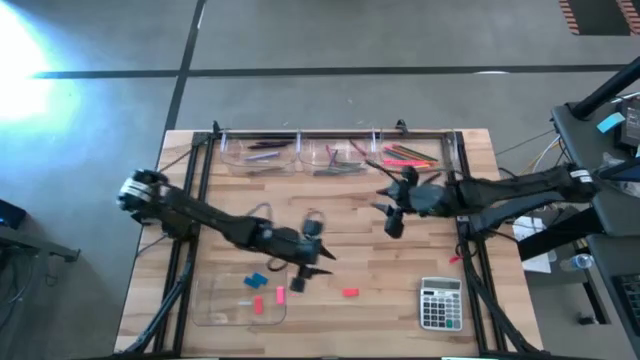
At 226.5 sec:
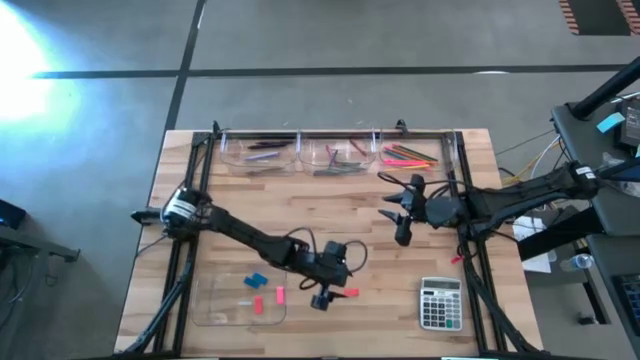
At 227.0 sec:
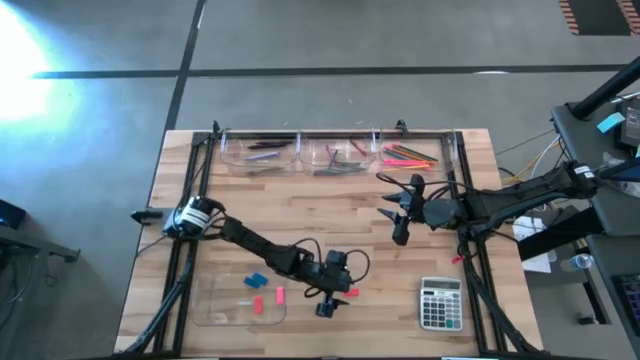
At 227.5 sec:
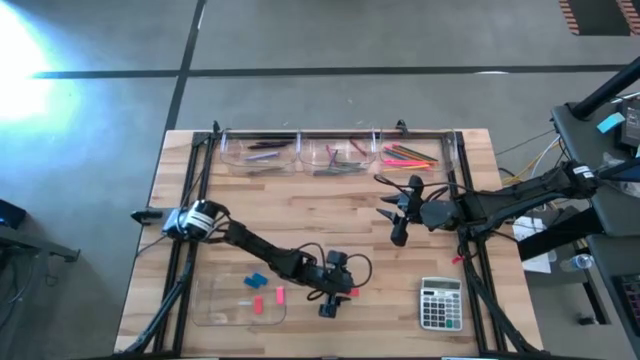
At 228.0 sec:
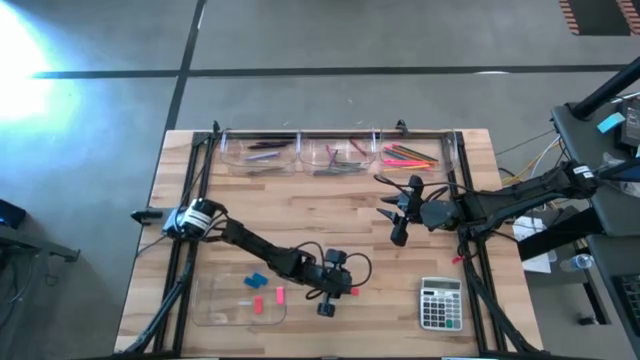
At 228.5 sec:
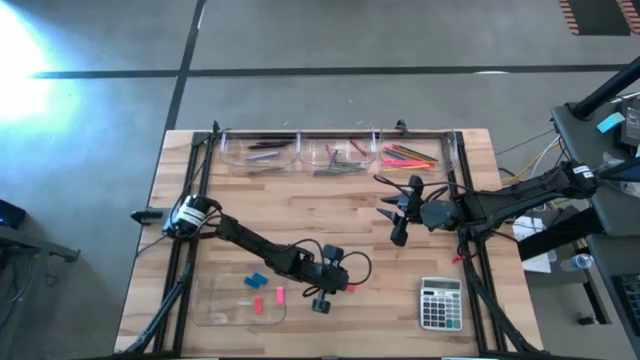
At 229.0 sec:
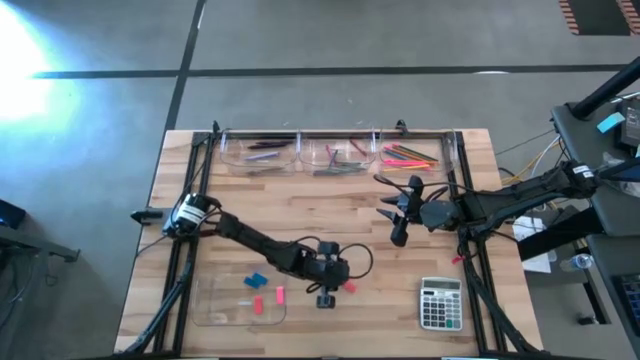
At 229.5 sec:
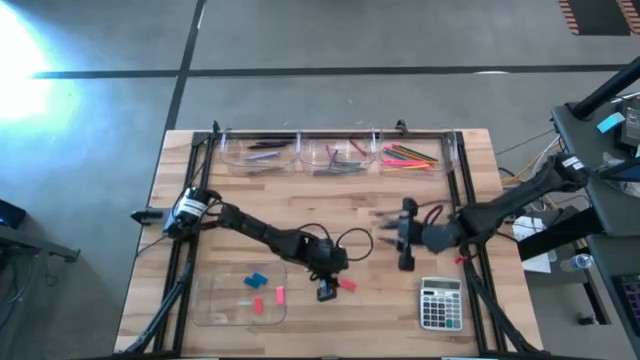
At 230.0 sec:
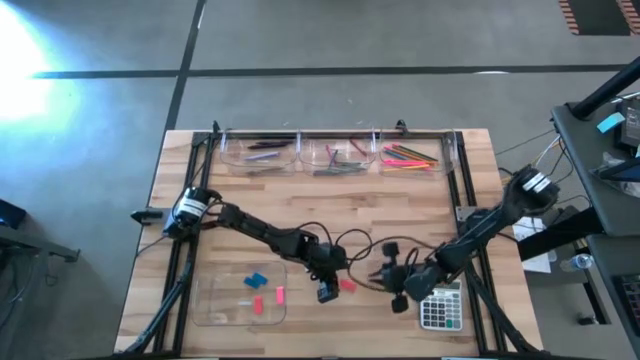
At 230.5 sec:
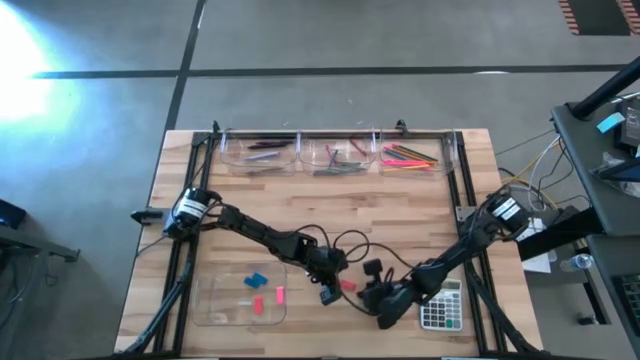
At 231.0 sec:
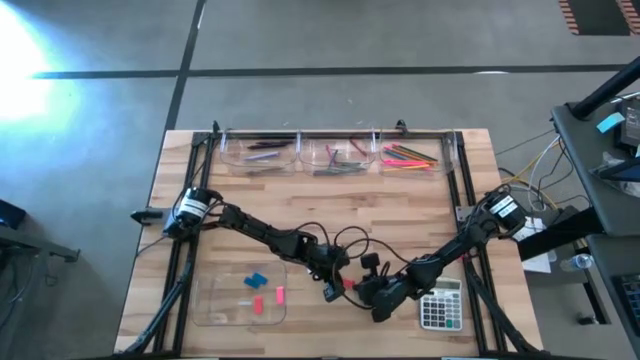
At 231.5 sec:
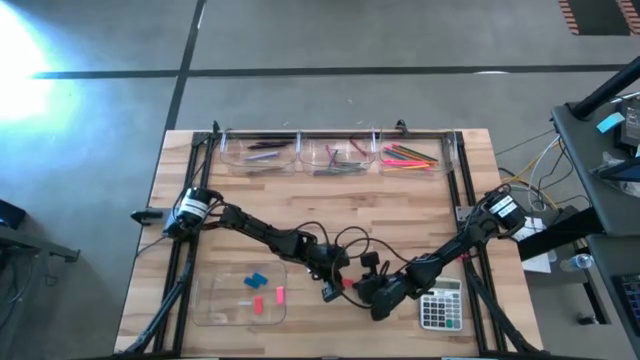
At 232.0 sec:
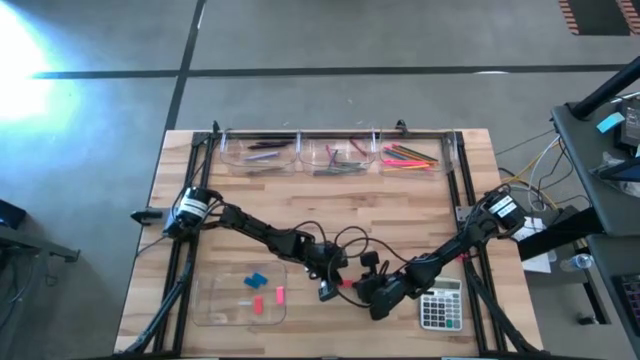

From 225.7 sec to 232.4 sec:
Task: Sort crayons/erasers/pens/pencils in bins
Put the orange eraser into the bottom transparent bin

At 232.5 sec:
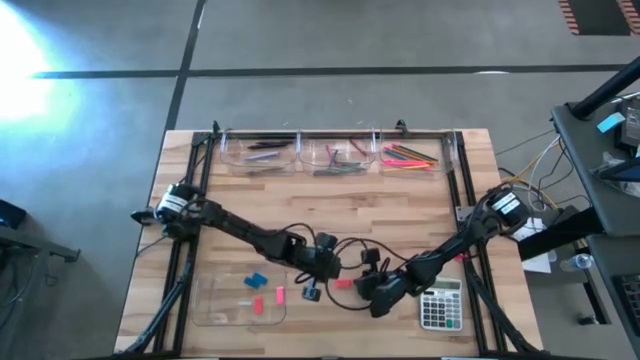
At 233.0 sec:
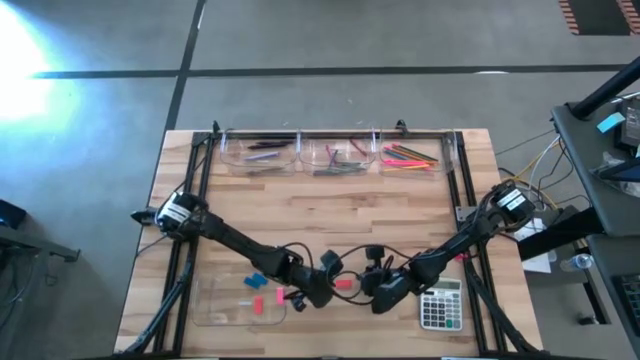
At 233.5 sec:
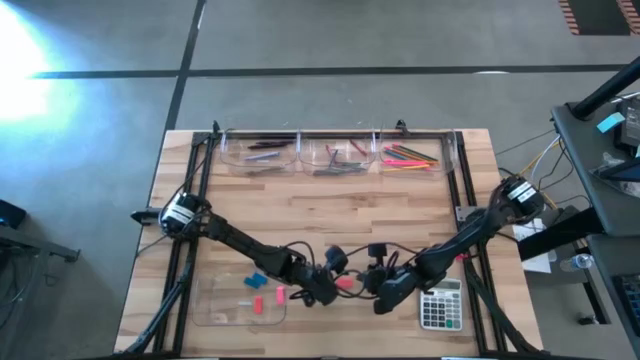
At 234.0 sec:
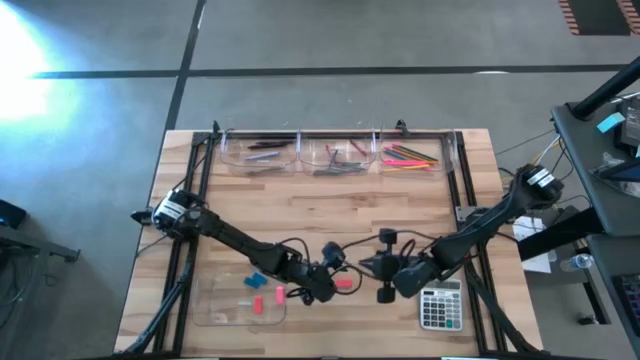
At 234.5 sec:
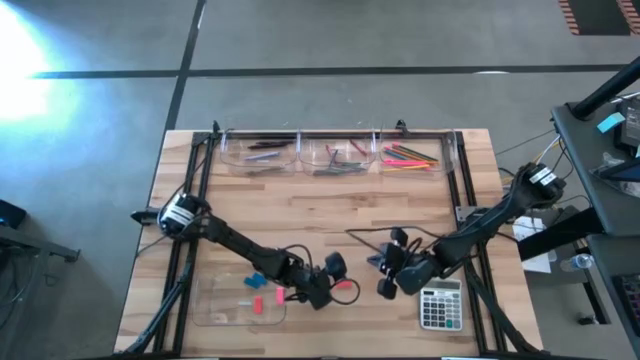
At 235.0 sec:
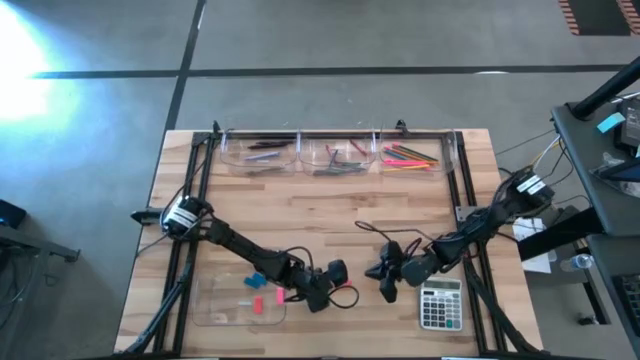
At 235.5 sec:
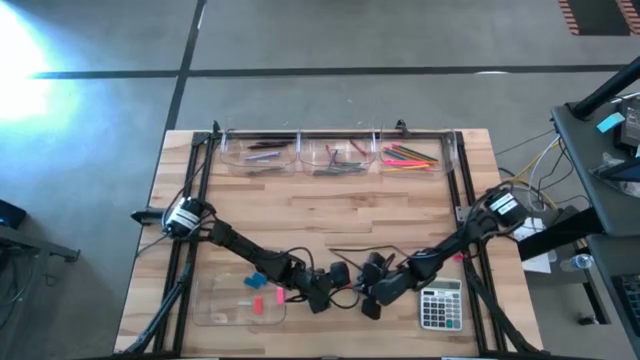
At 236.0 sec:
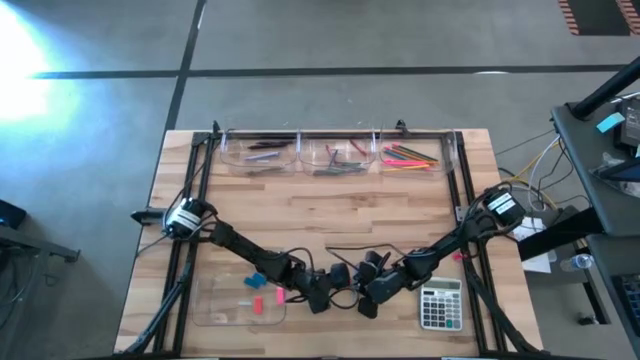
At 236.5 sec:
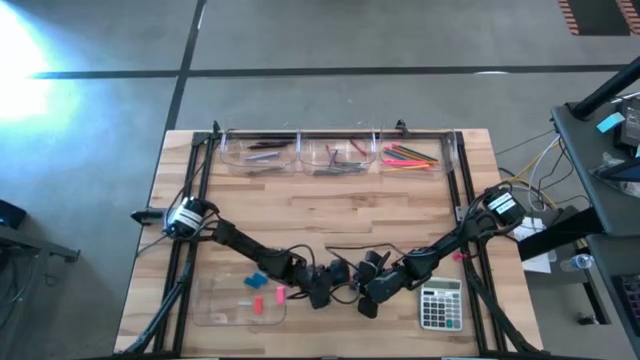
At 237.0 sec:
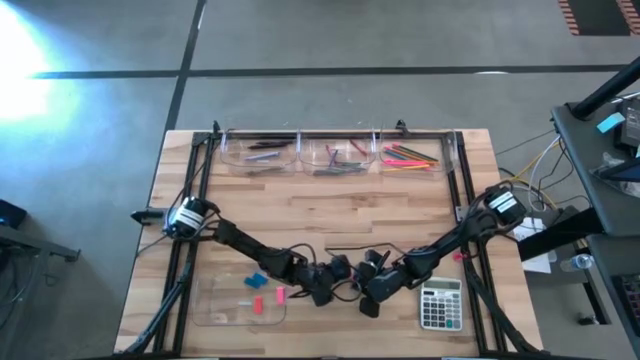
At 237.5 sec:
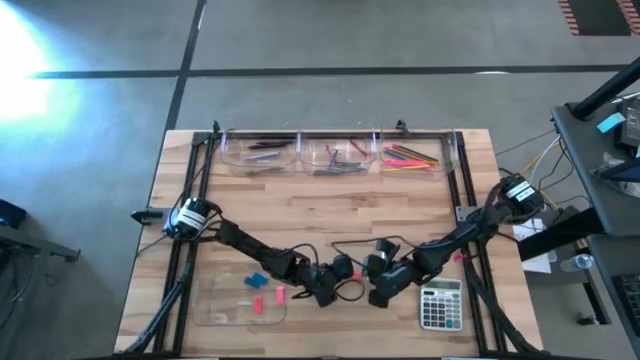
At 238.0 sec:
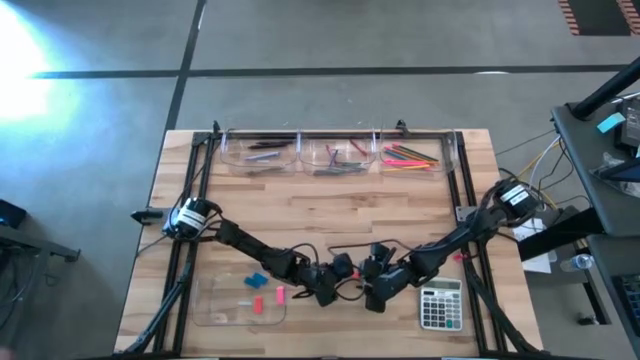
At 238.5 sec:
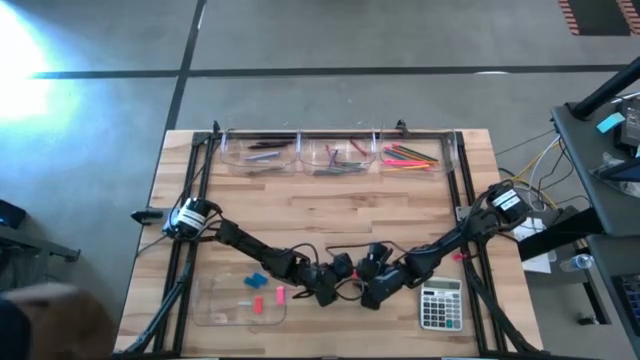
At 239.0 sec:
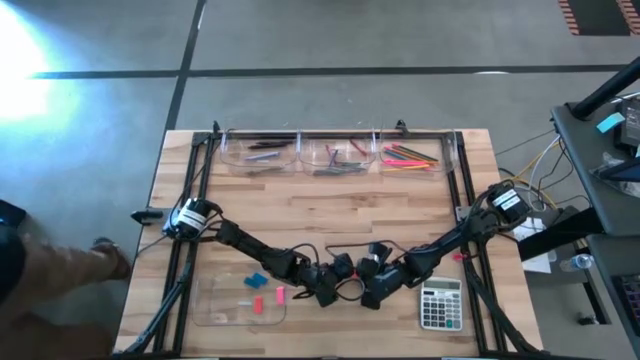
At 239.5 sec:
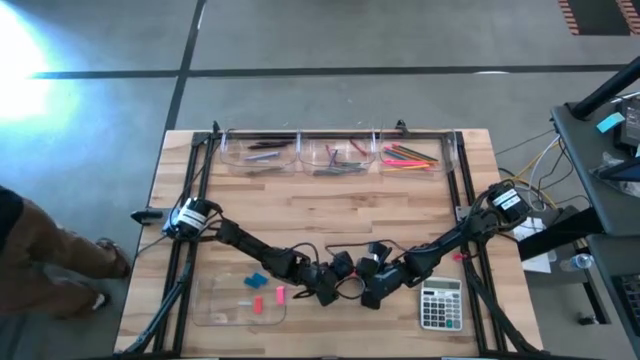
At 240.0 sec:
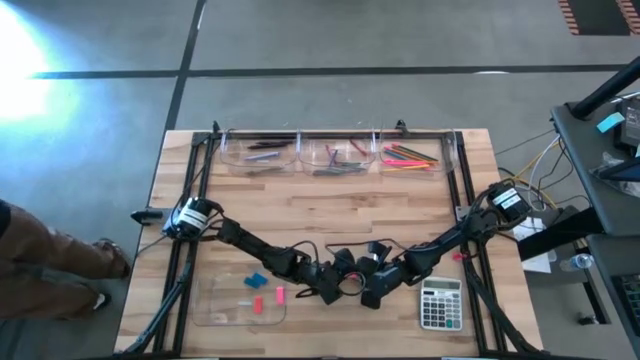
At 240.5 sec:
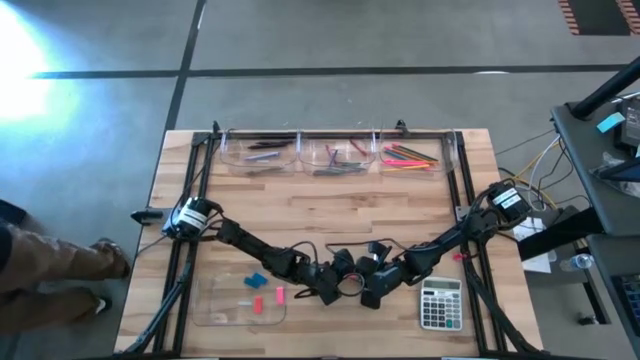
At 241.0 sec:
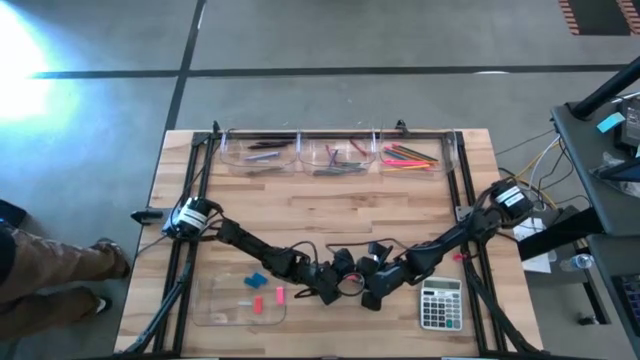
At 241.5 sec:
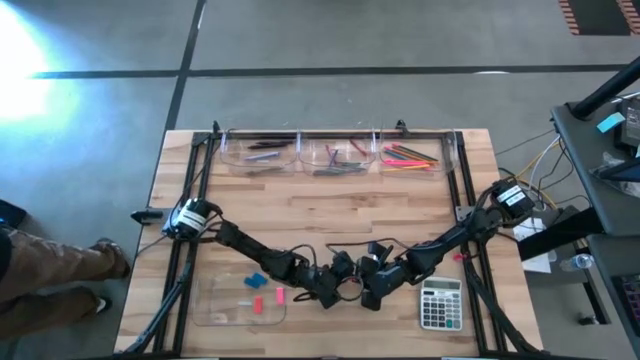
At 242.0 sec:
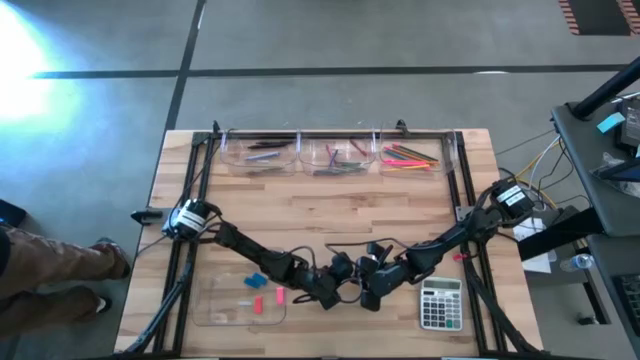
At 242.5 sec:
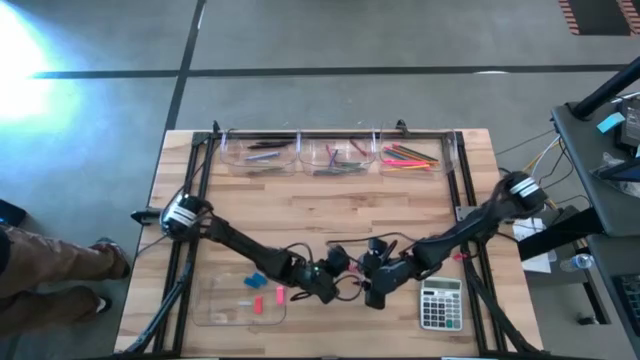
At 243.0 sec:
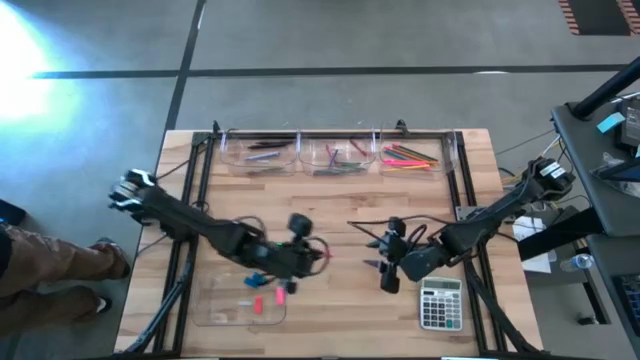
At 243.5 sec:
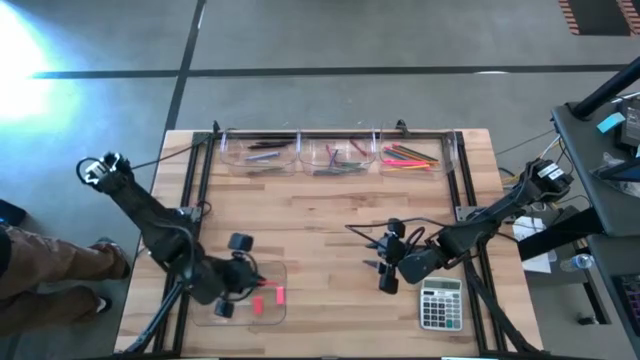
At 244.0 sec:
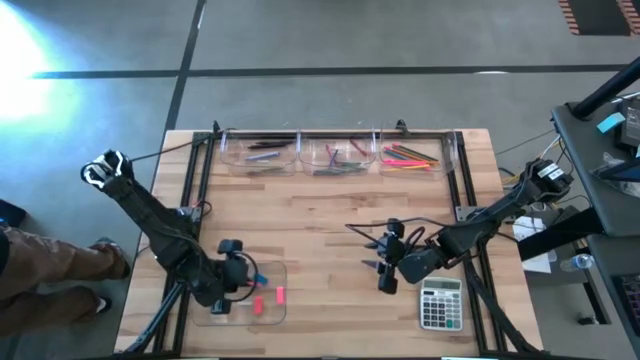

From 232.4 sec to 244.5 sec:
Put the orange eraser into the bottom transparent bin

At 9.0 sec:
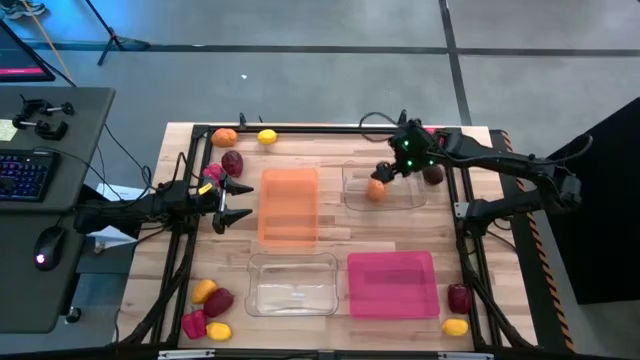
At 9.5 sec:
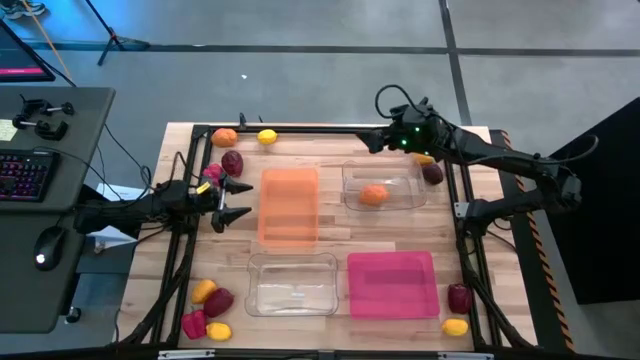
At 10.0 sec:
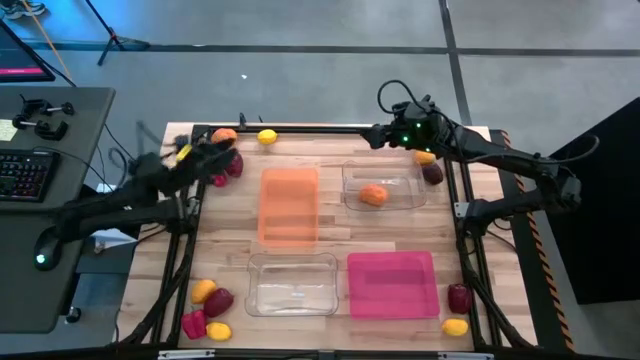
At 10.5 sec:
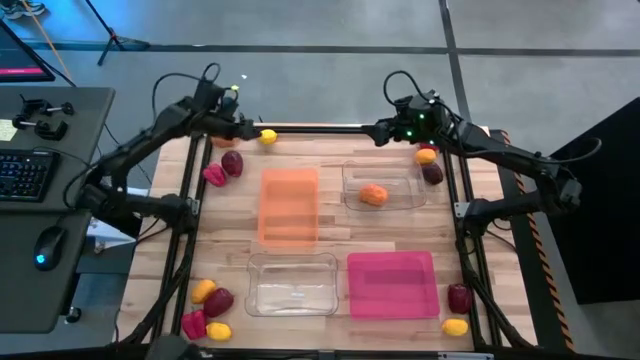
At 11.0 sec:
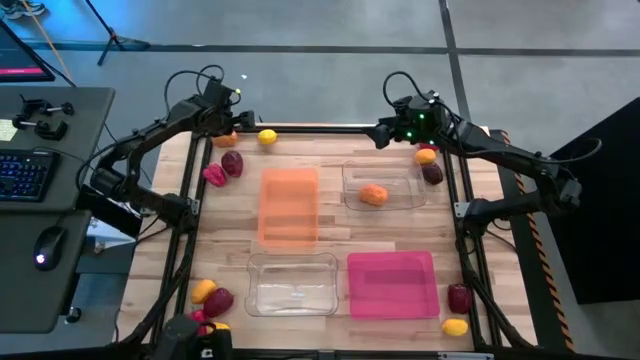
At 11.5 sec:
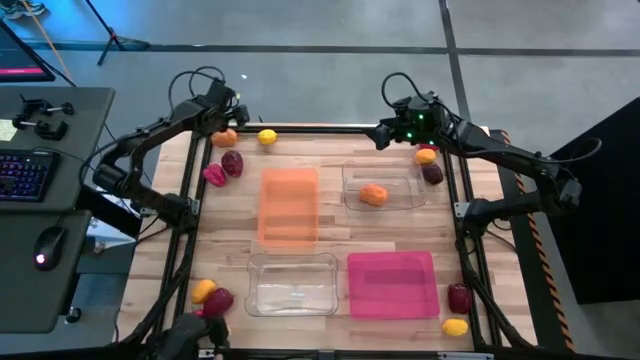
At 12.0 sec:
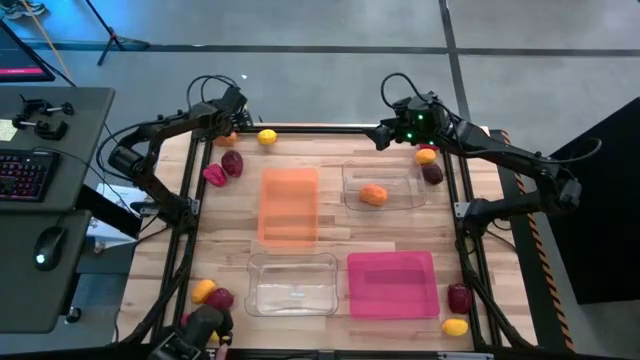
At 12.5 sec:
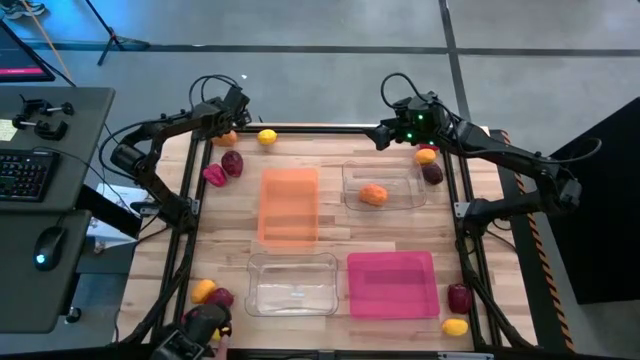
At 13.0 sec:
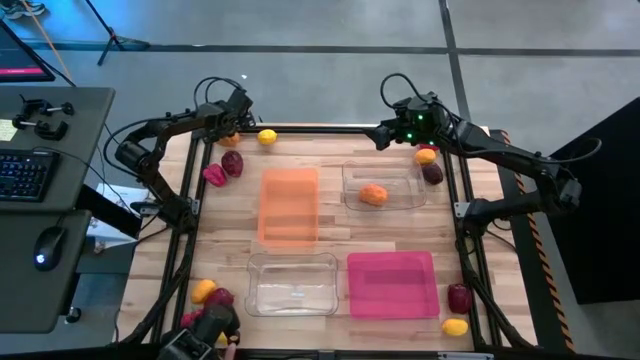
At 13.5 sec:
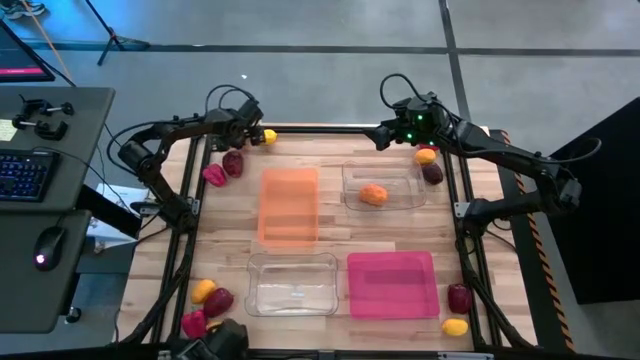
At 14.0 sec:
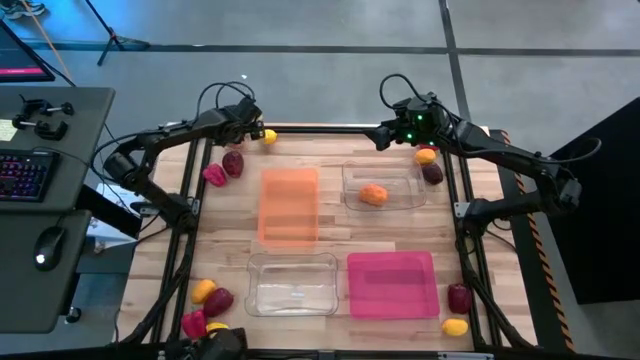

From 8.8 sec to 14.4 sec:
Task: Sort produce into baskets
Put the mango into the top transparent bin
